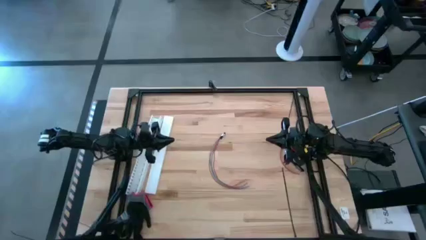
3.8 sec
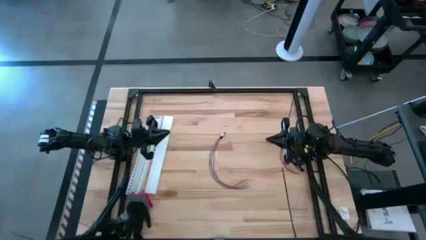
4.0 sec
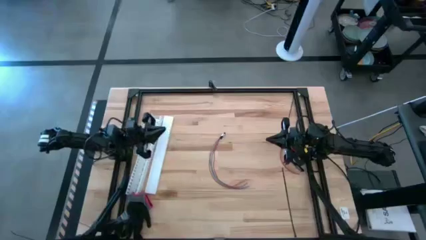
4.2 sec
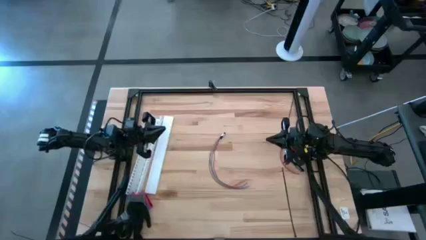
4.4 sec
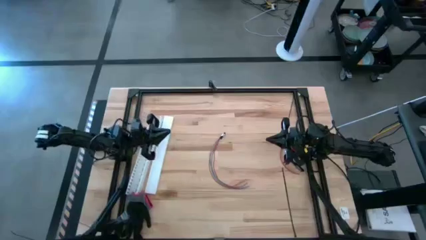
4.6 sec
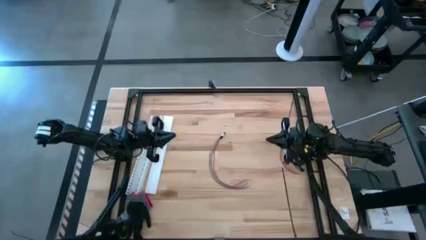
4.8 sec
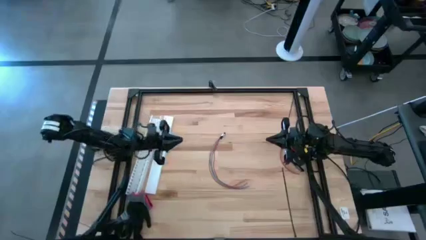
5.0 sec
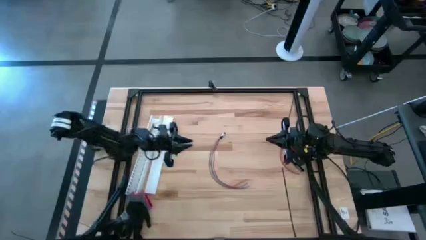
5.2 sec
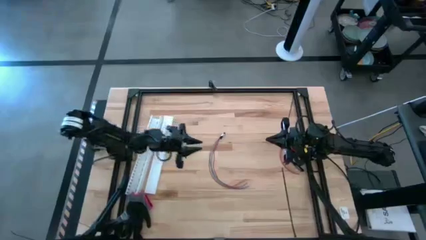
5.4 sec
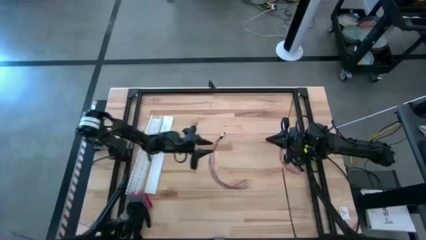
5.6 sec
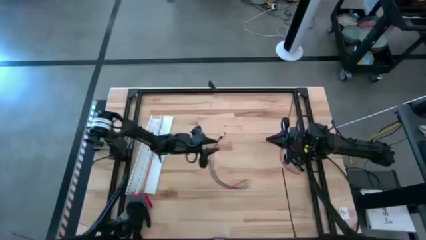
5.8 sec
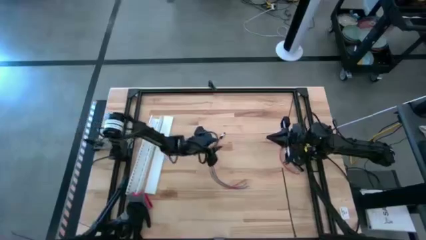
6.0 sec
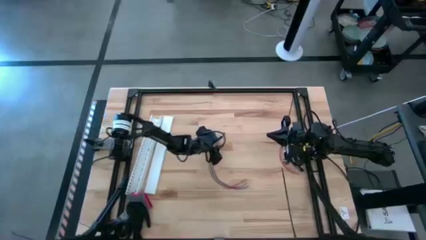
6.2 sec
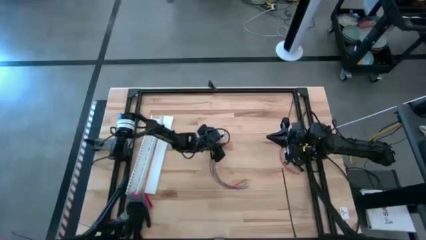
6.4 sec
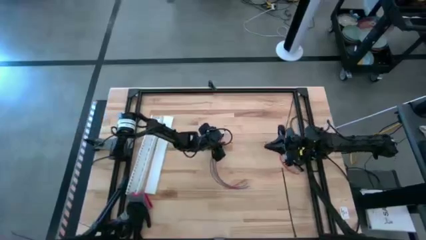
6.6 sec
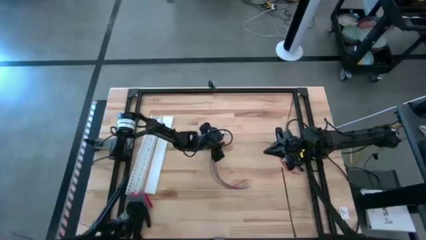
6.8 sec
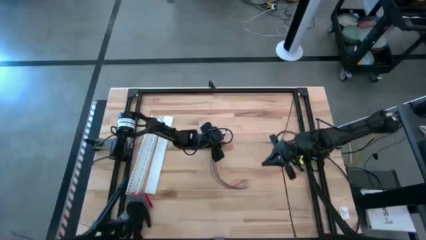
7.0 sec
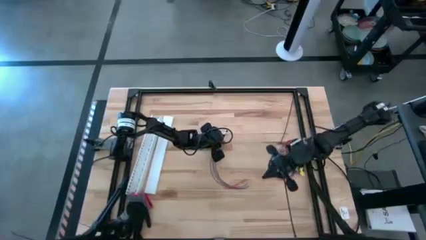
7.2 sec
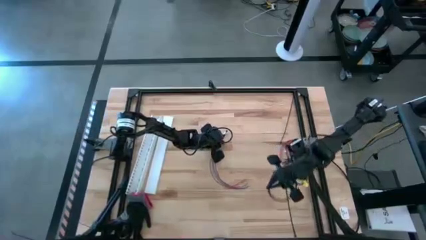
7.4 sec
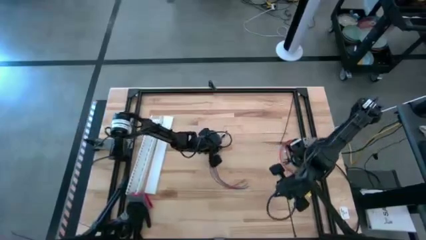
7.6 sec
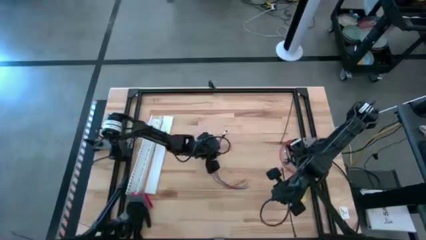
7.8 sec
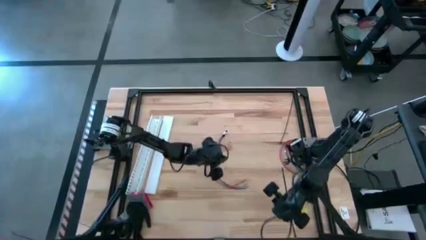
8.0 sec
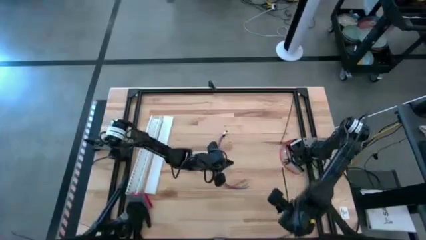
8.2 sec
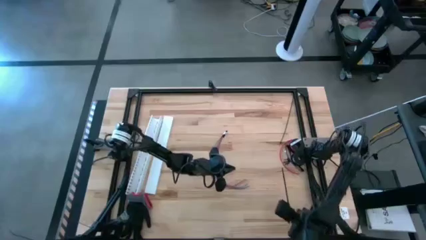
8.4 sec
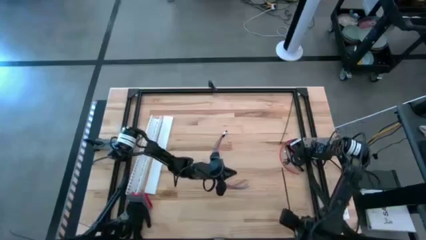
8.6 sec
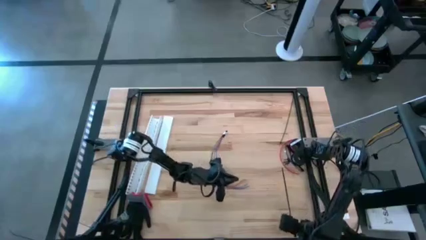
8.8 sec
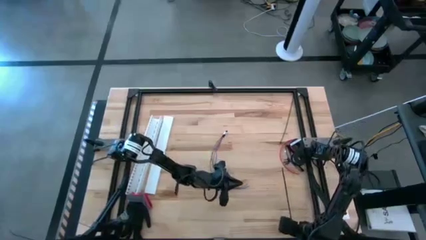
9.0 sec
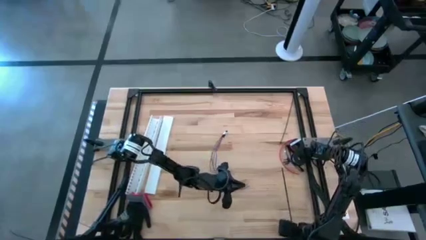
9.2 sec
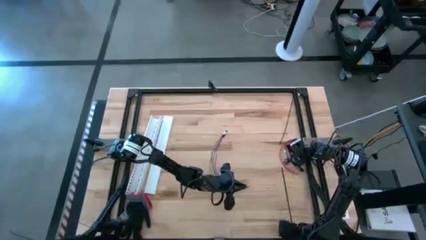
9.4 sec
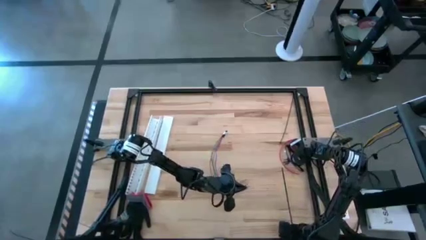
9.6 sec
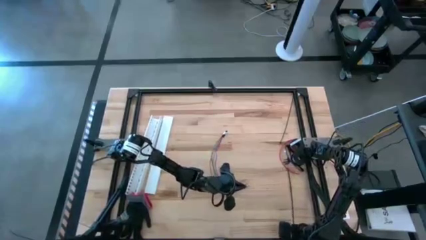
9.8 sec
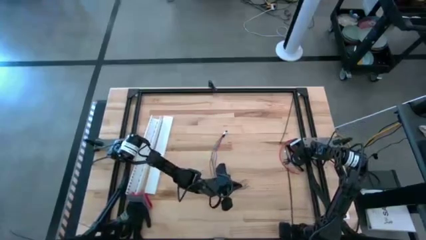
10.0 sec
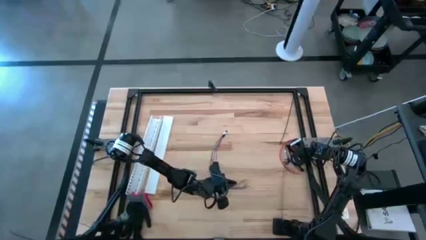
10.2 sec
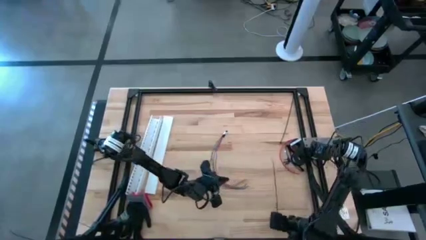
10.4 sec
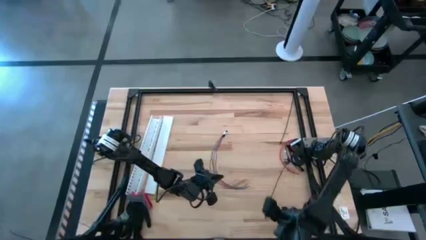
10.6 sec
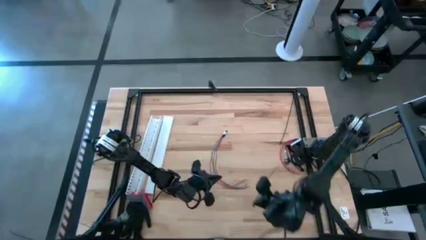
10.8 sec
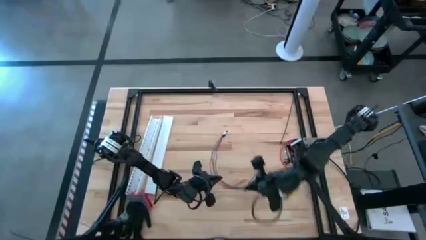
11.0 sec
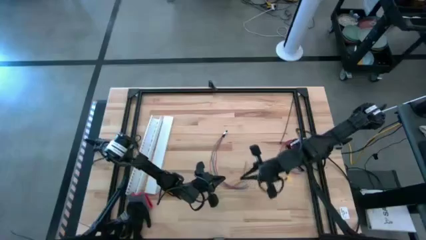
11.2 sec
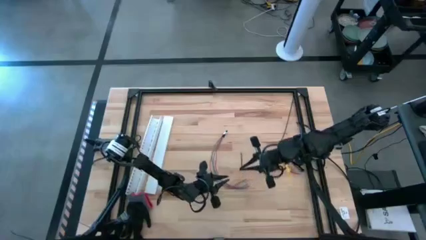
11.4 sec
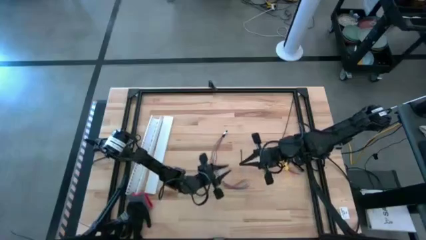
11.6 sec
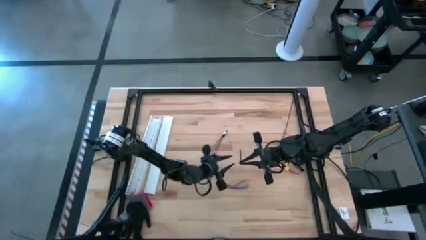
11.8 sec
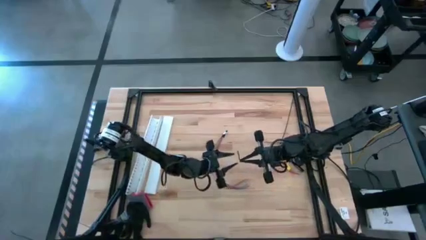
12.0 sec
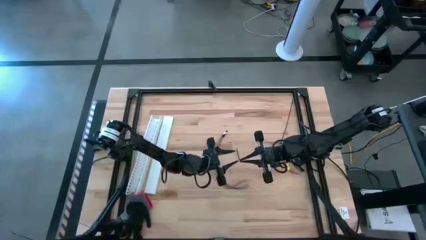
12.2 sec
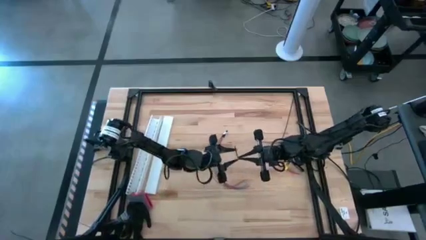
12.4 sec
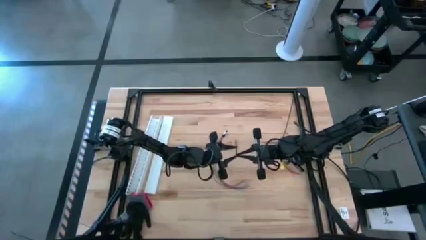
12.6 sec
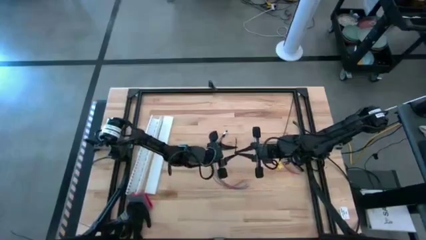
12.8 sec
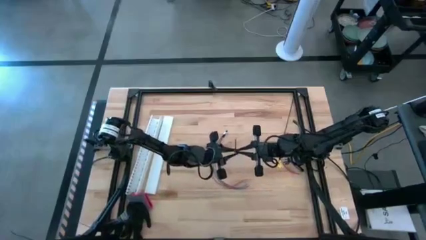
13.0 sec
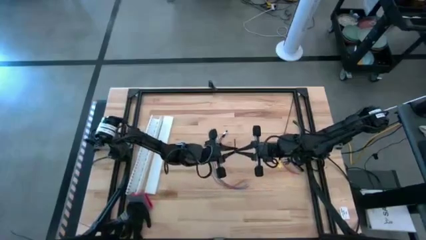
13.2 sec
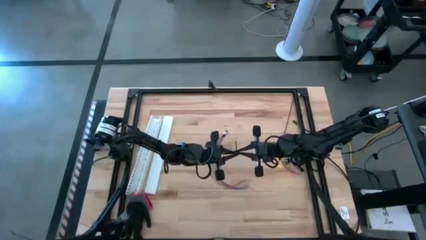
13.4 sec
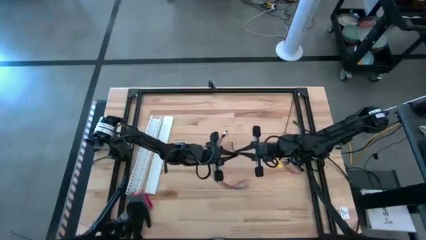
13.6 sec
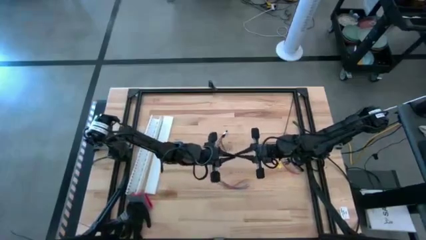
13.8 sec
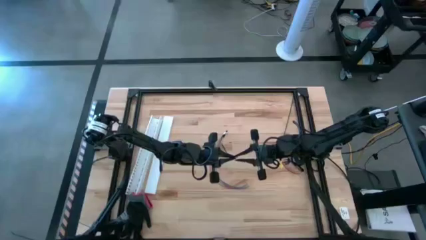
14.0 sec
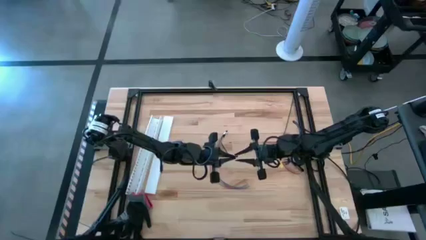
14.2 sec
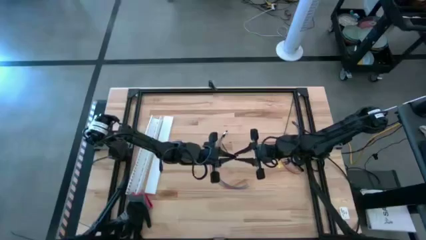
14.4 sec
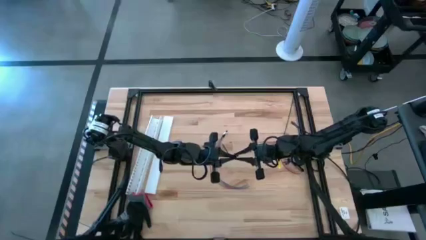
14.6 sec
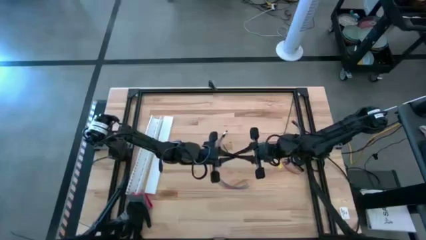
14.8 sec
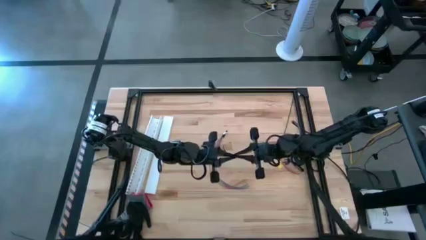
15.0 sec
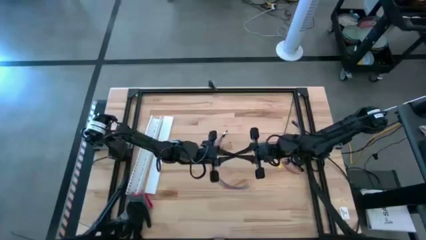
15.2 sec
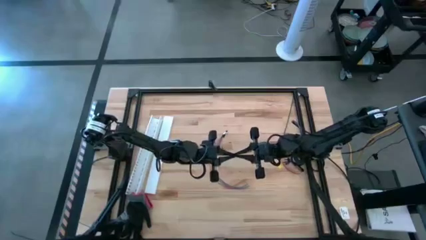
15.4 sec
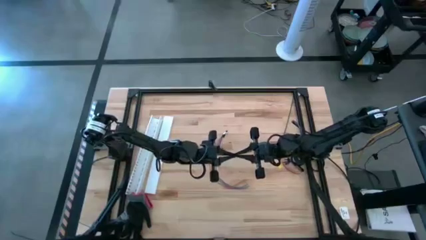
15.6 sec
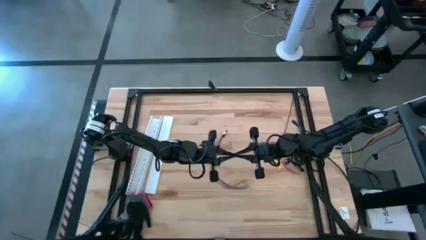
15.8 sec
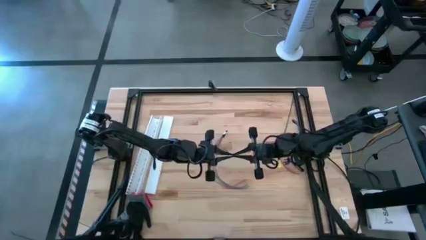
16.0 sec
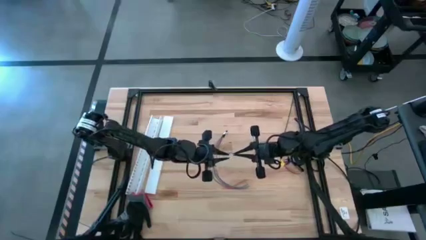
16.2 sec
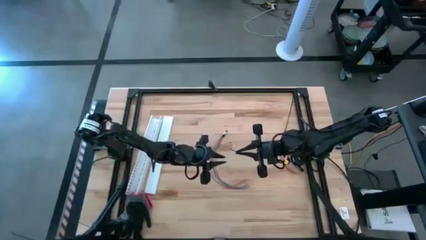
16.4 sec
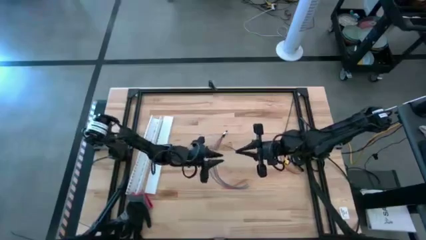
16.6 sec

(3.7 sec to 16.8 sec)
Task: Ziptie cables
Insert the bottom black ziptie into the black ziptie lock
